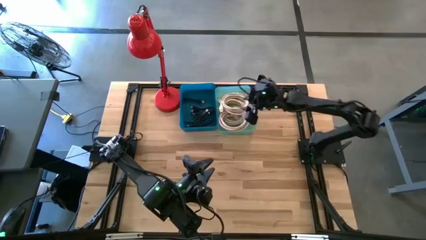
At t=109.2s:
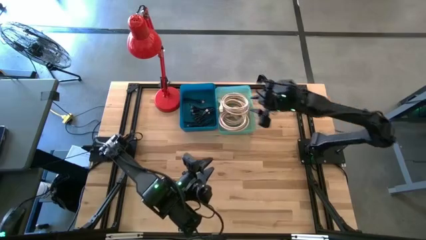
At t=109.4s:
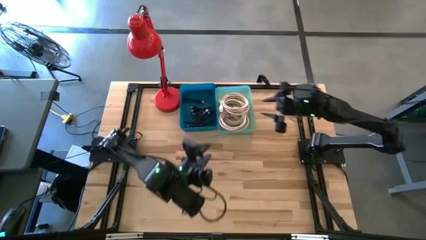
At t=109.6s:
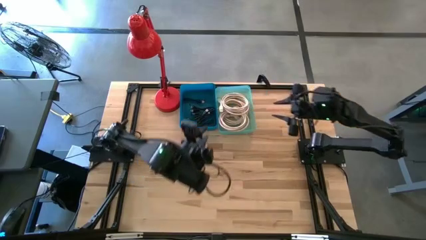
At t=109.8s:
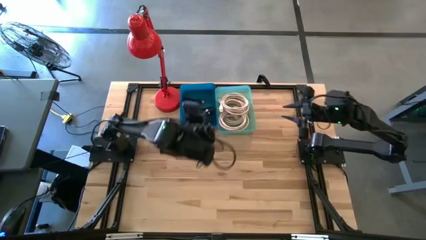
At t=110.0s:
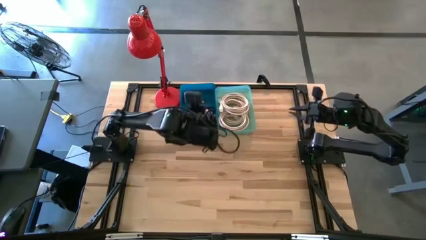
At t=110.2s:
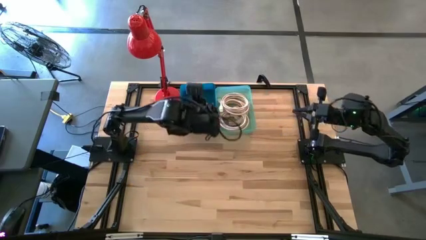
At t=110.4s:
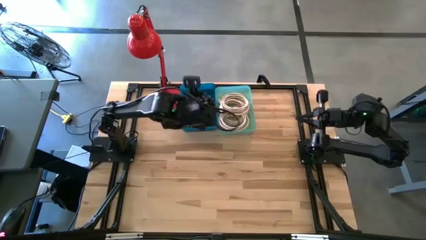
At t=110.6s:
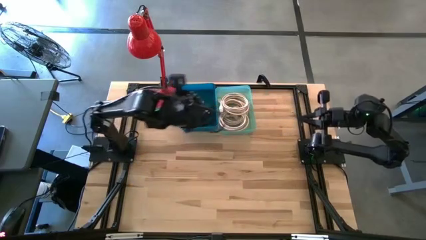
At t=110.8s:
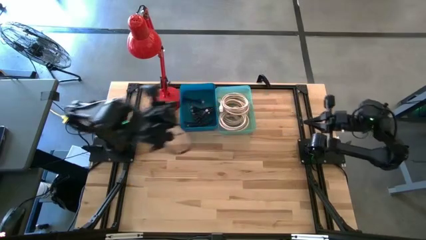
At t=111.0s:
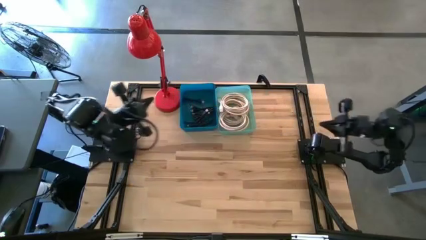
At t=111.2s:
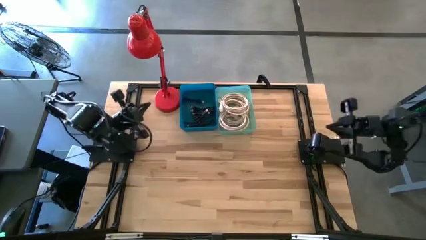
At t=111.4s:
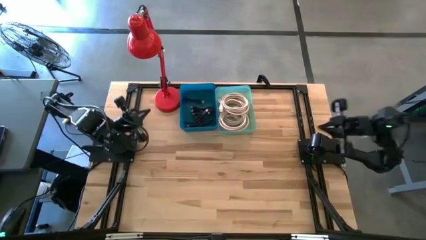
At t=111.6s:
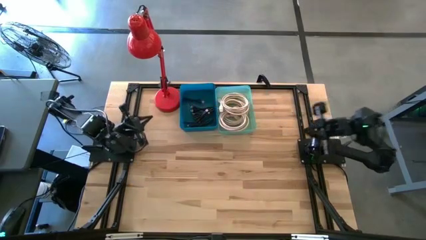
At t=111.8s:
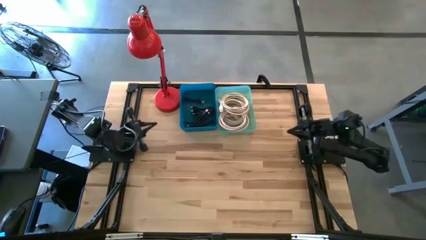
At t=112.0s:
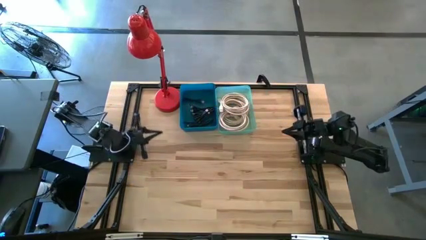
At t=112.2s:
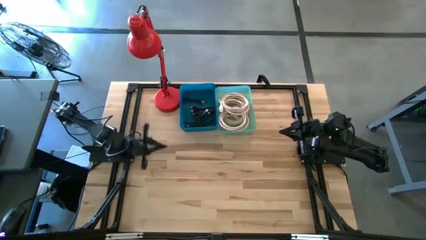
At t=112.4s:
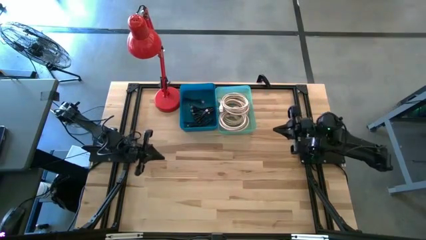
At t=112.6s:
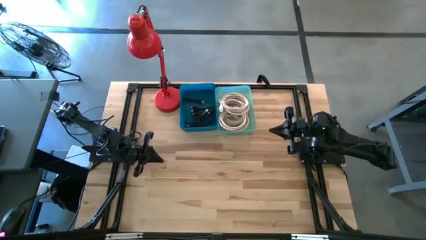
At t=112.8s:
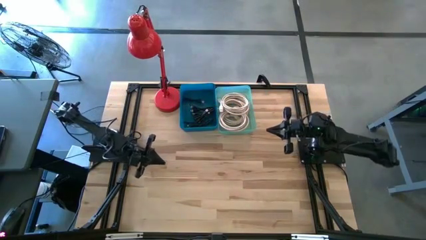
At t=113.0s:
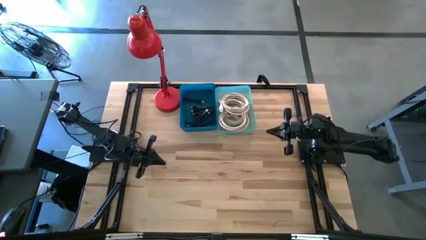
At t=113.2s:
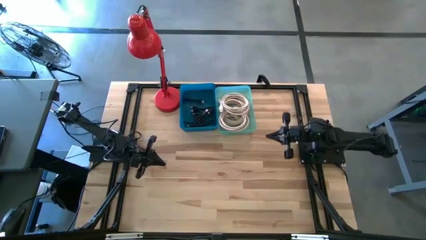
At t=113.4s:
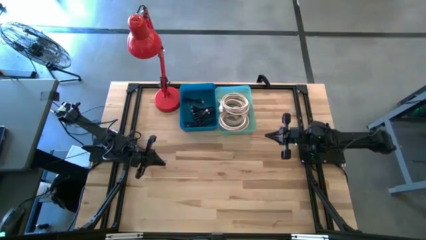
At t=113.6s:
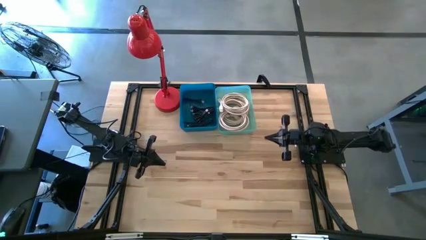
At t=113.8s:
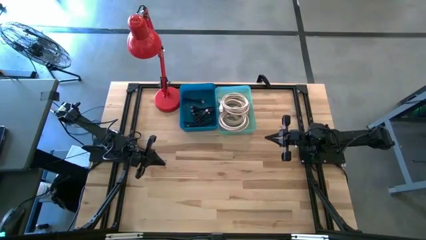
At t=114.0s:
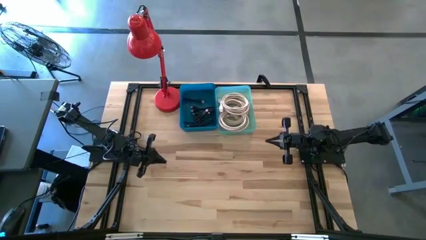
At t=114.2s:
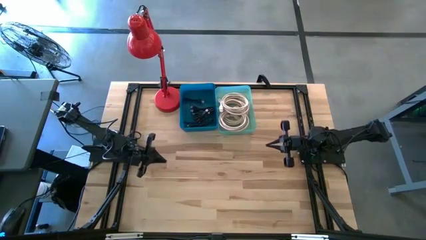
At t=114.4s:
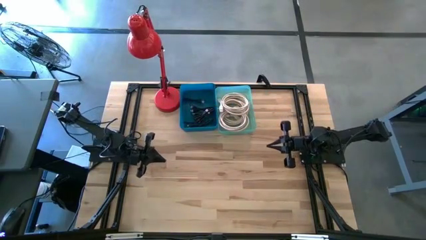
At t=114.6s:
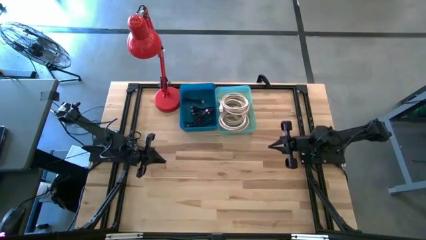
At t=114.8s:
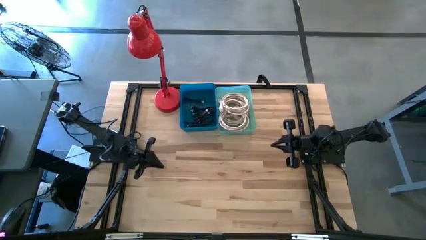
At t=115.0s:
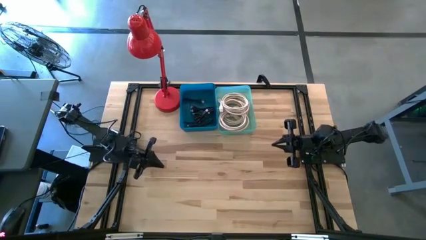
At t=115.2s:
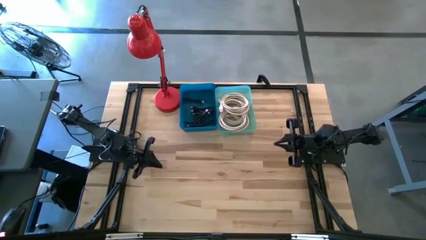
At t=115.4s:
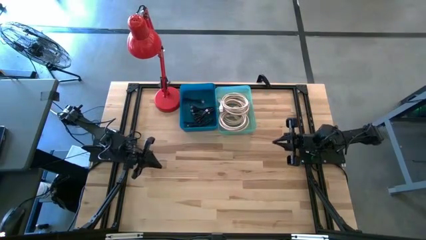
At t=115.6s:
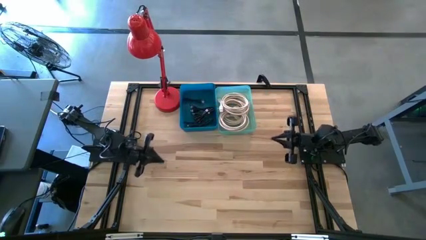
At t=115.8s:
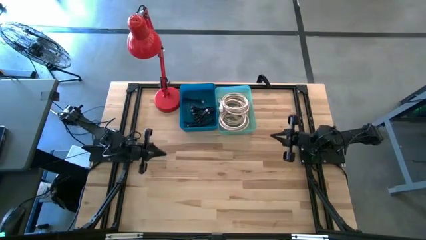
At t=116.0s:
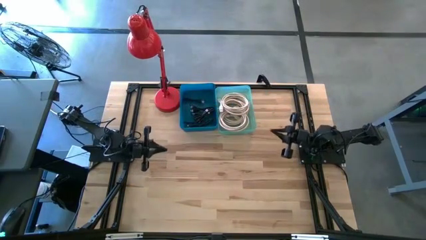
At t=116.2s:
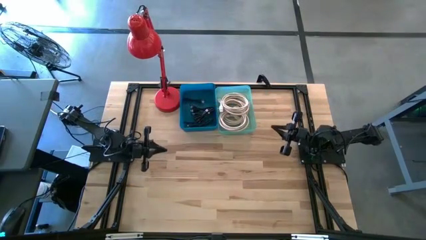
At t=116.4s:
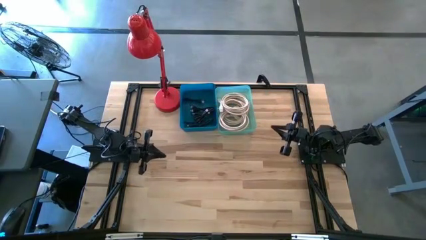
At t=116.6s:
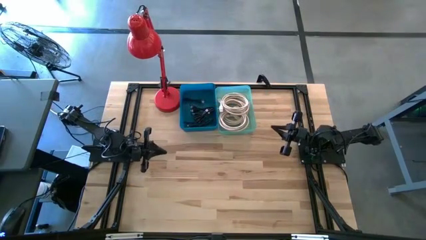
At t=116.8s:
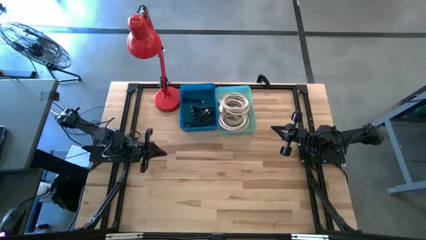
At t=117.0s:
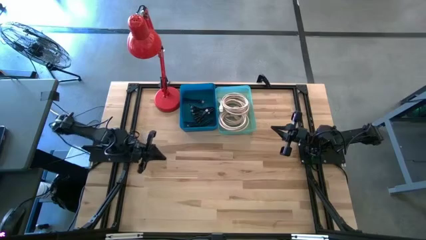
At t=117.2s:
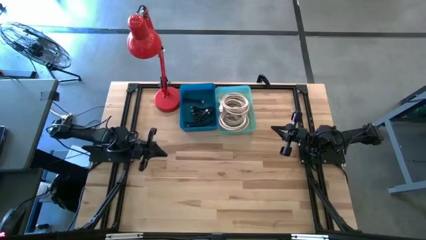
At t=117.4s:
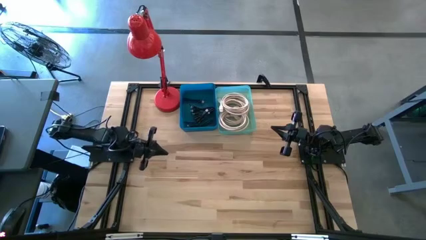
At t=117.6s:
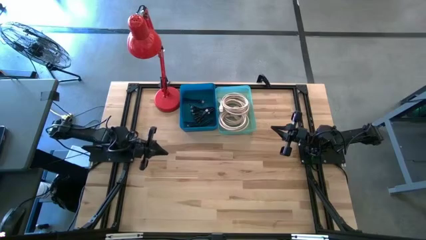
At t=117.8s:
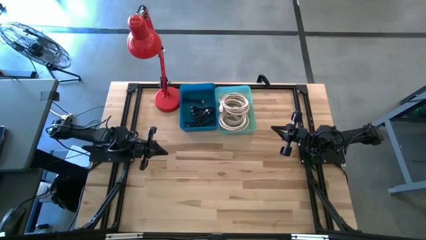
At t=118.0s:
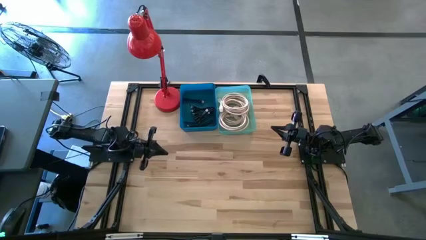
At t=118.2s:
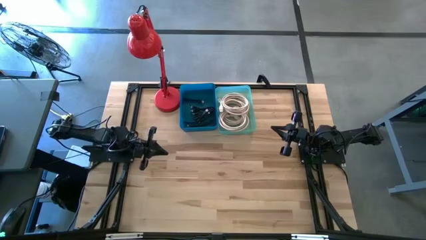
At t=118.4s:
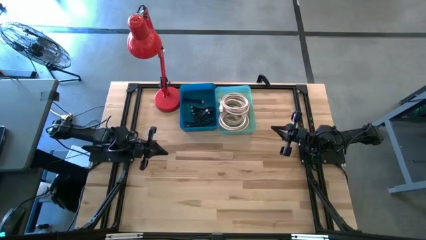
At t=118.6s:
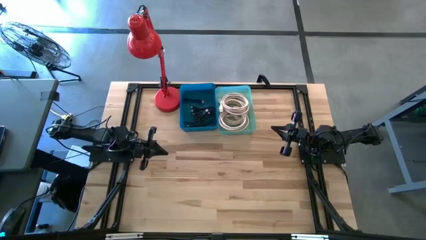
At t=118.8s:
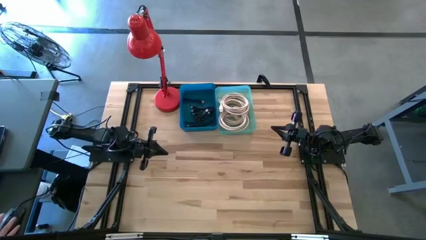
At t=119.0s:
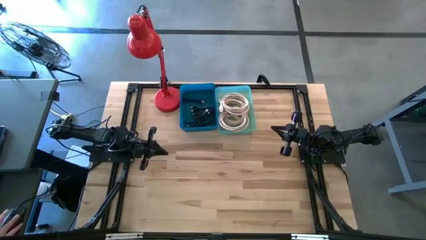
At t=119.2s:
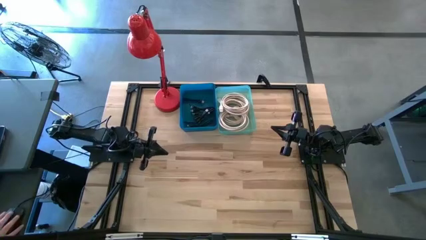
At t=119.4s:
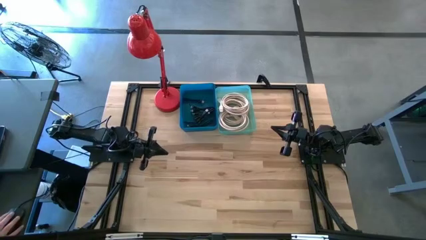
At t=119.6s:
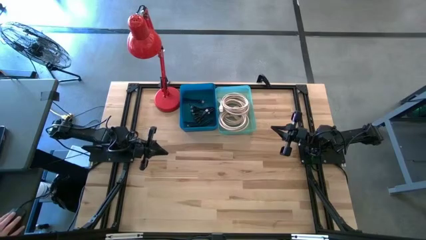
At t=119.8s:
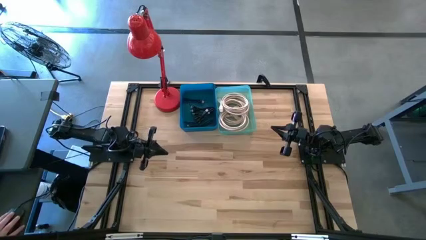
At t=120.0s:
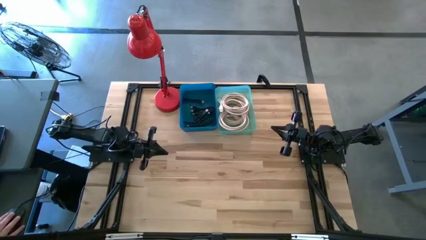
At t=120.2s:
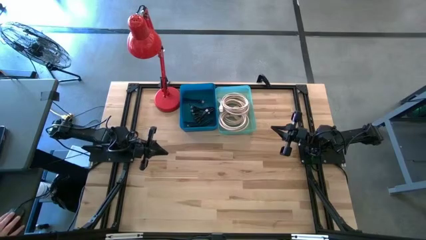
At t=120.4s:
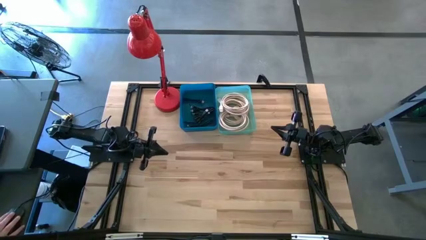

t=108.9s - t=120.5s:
Task: Pick & Place USB Port
Return to Home Position

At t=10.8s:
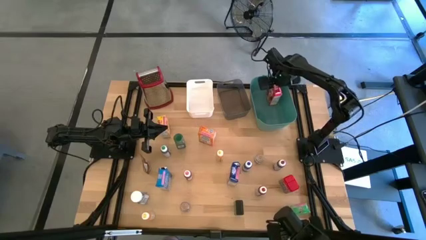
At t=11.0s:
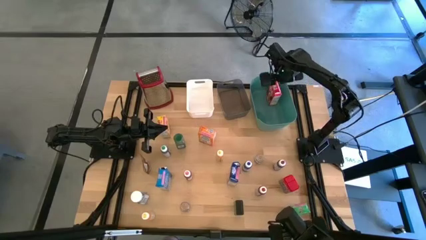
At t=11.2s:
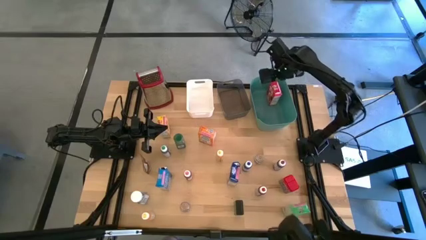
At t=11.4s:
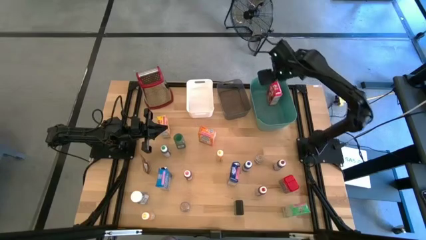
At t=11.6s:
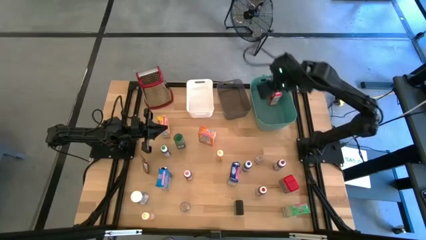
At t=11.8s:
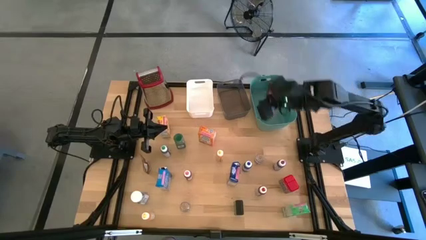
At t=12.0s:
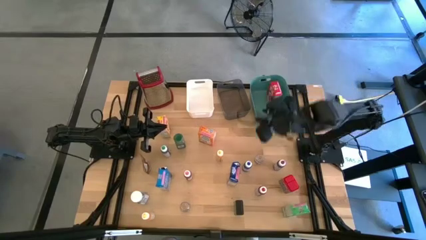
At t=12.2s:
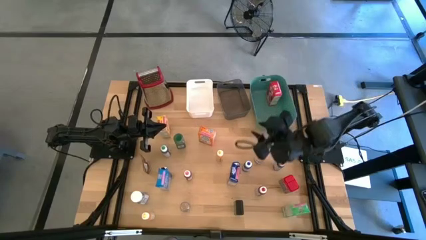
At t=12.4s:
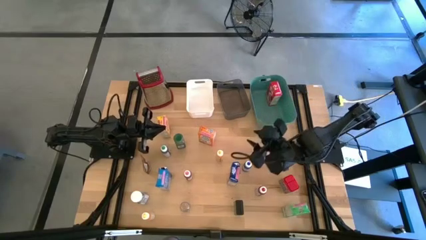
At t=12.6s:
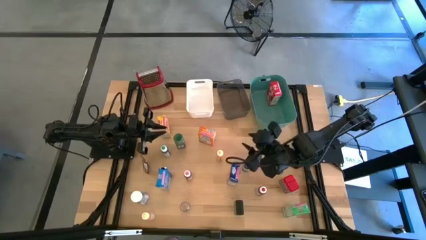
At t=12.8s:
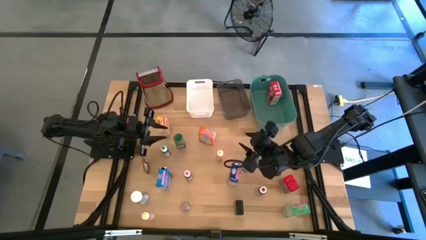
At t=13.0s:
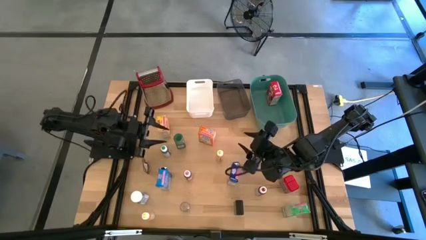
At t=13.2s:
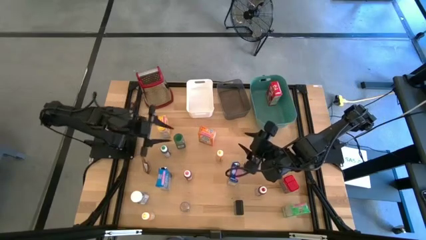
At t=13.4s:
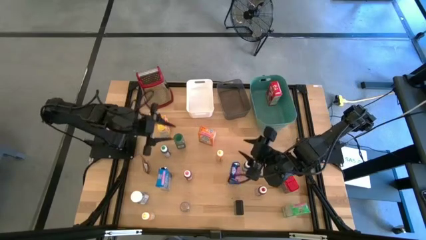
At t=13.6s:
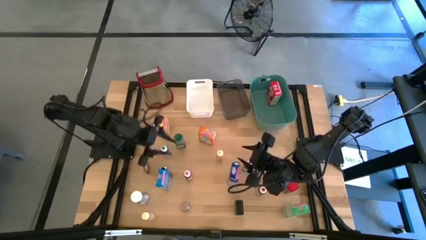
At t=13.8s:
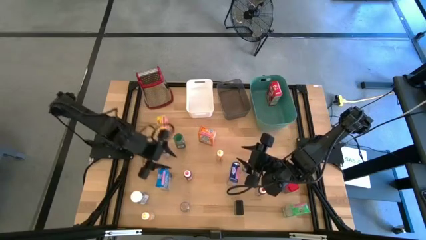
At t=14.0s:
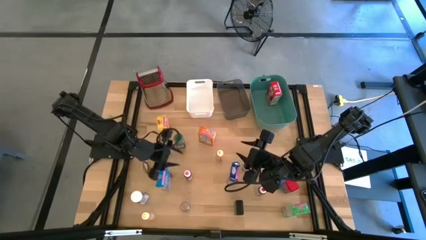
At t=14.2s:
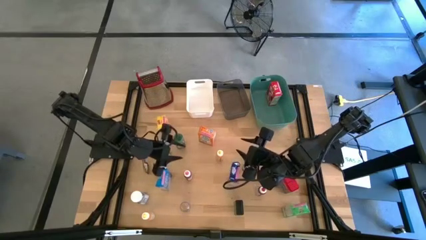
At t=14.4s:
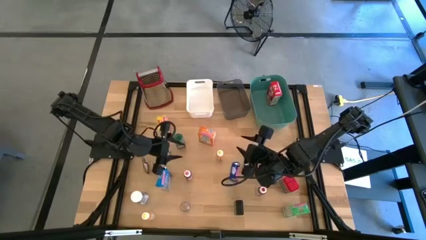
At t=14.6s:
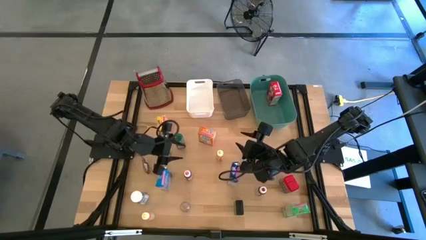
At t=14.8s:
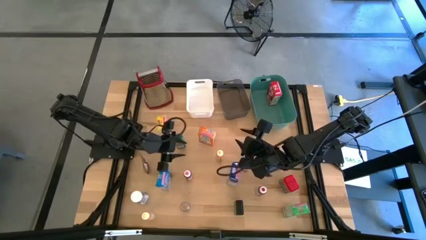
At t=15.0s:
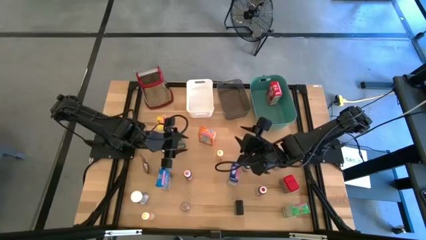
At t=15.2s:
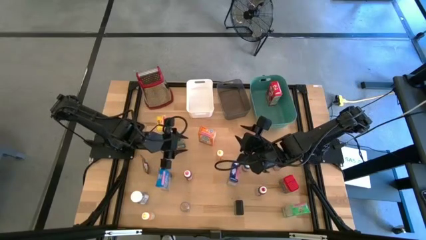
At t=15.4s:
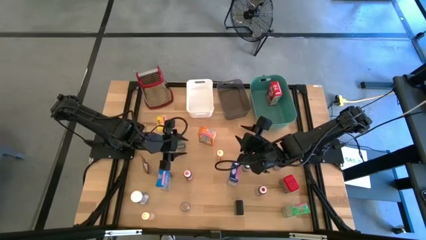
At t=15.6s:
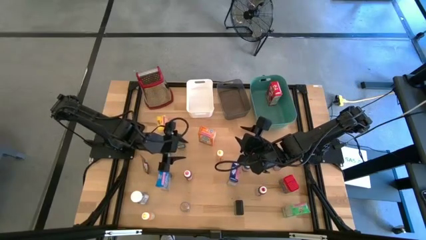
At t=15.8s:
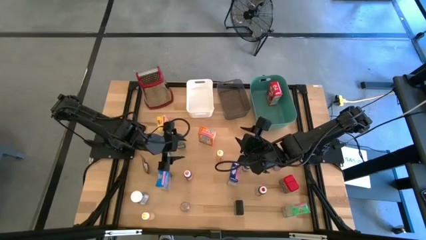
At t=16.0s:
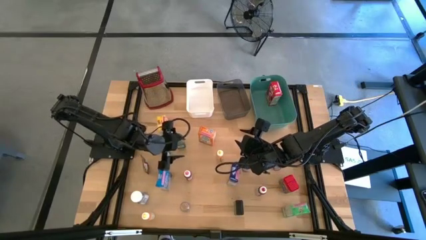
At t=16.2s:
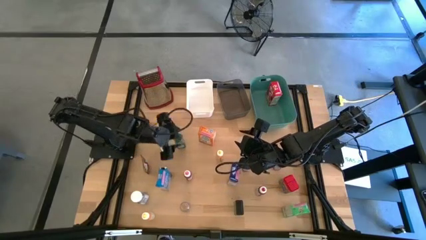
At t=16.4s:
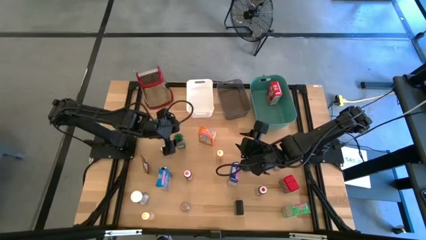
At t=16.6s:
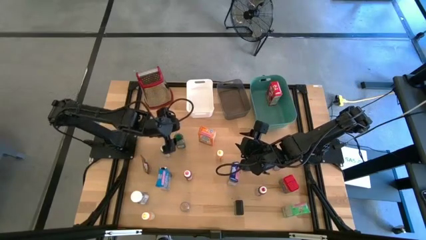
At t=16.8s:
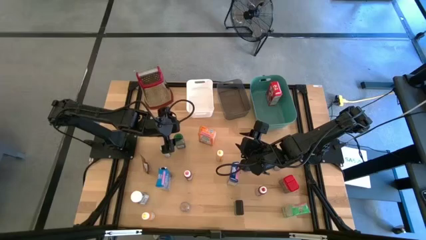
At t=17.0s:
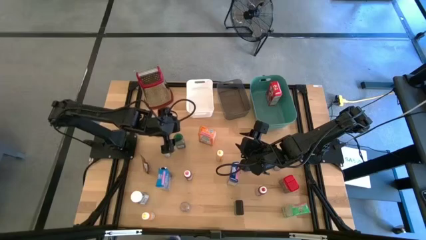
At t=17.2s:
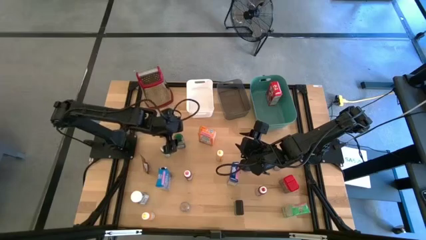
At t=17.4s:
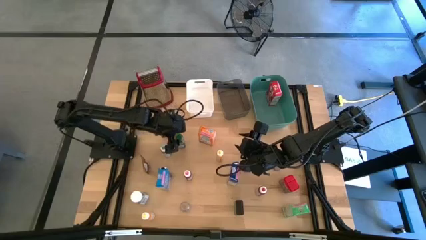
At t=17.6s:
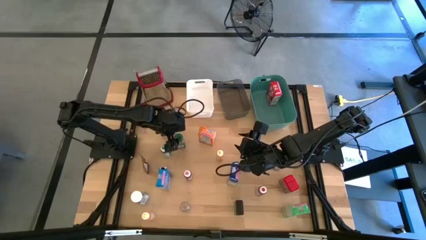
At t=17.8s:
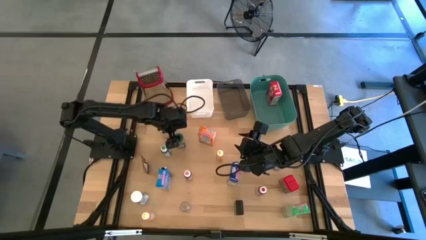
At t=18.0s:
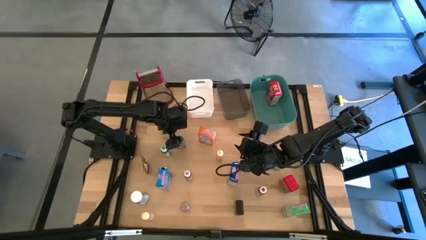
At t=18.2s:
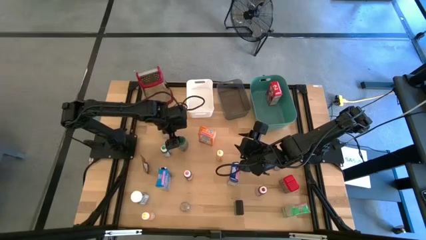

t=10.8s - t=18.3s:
Task: Pick & Place Kitchen Items
Put the green seasoning bottle into the white bin
